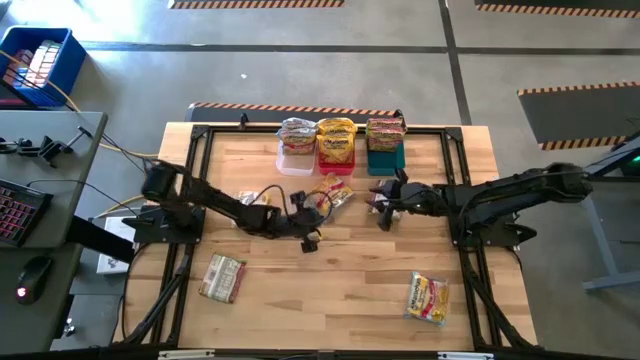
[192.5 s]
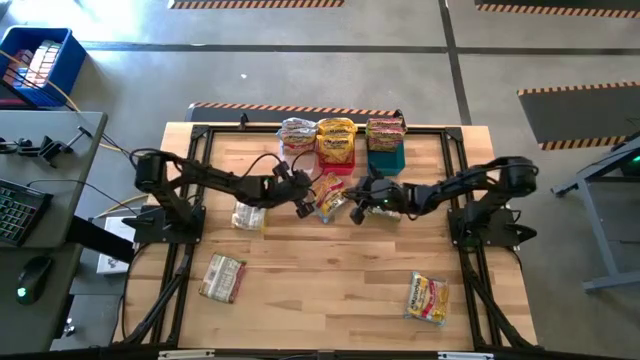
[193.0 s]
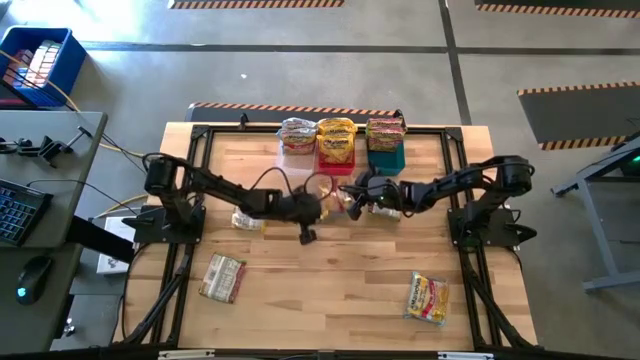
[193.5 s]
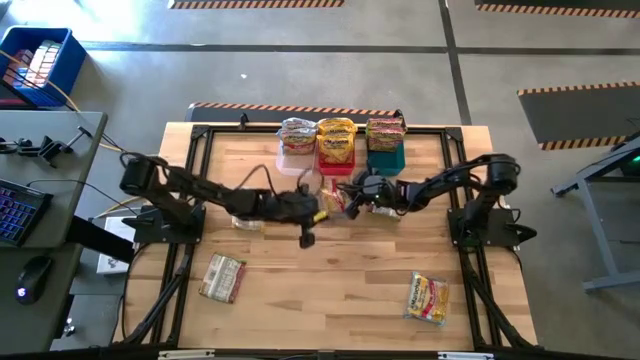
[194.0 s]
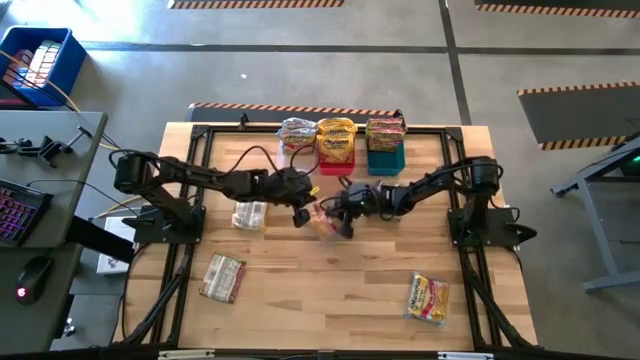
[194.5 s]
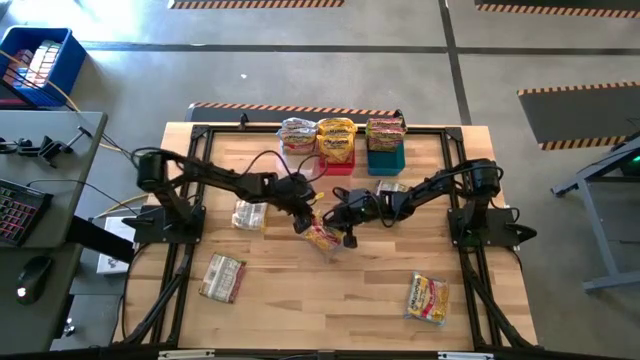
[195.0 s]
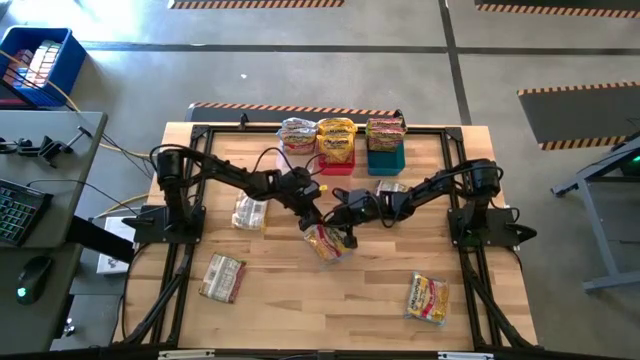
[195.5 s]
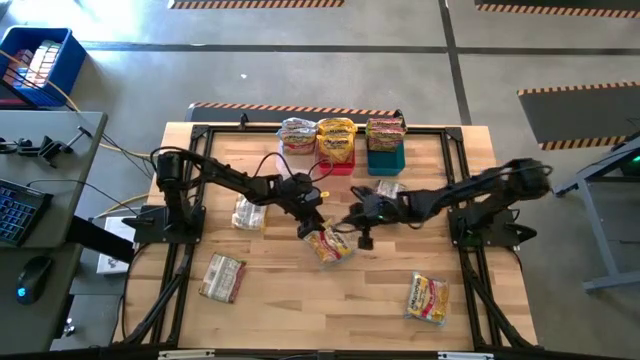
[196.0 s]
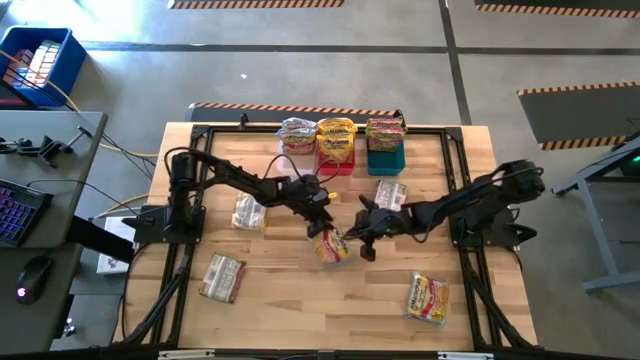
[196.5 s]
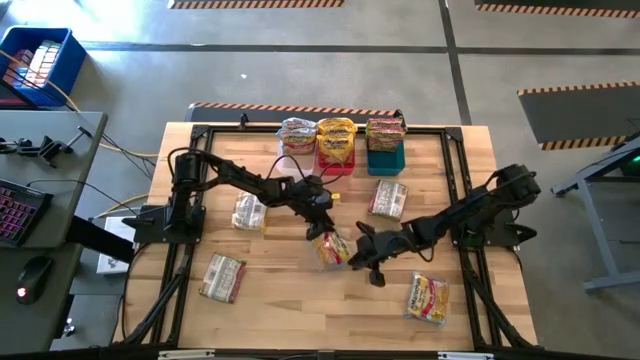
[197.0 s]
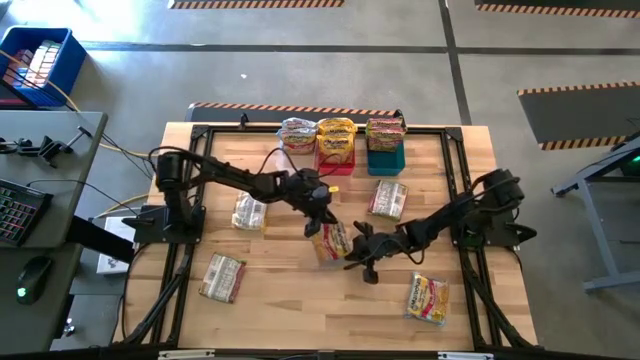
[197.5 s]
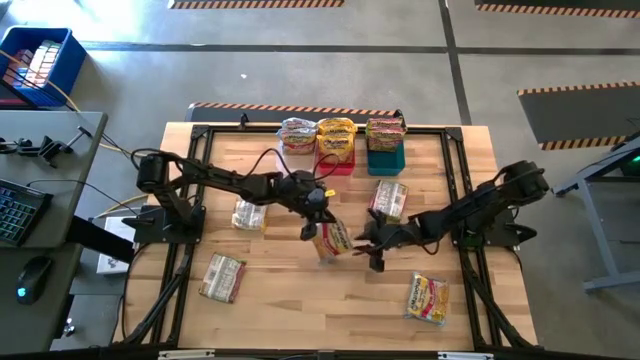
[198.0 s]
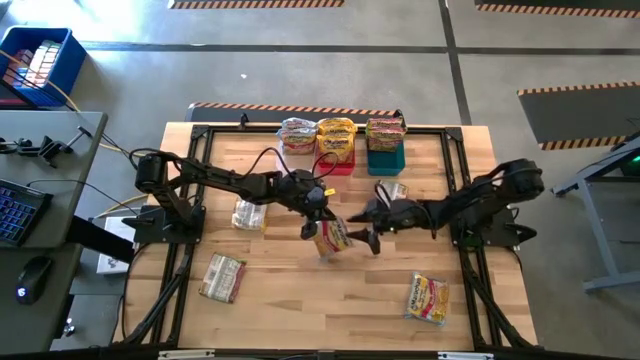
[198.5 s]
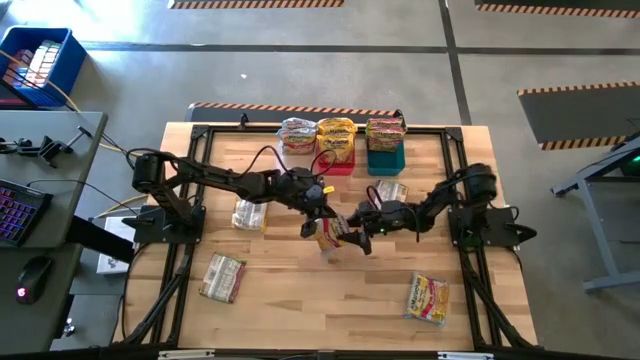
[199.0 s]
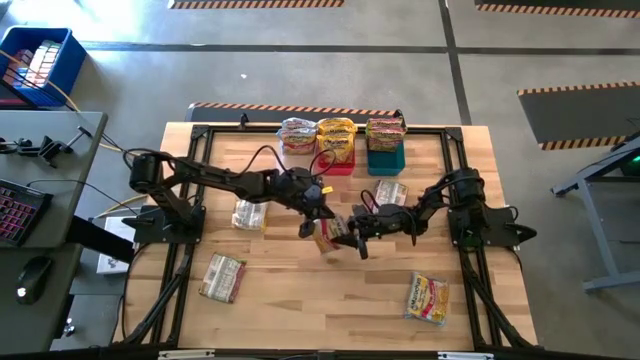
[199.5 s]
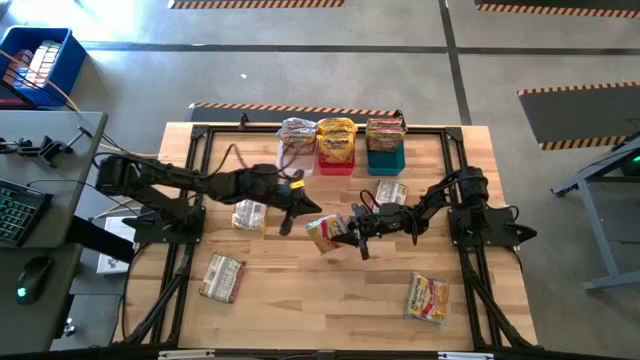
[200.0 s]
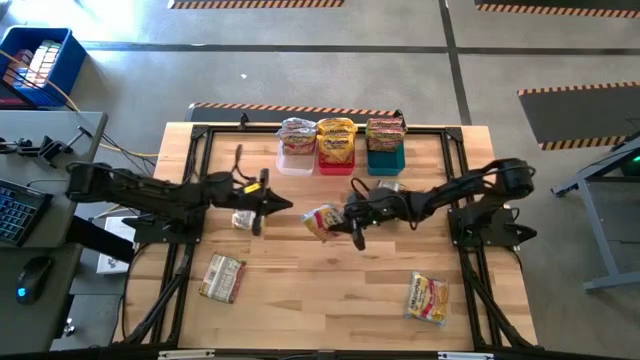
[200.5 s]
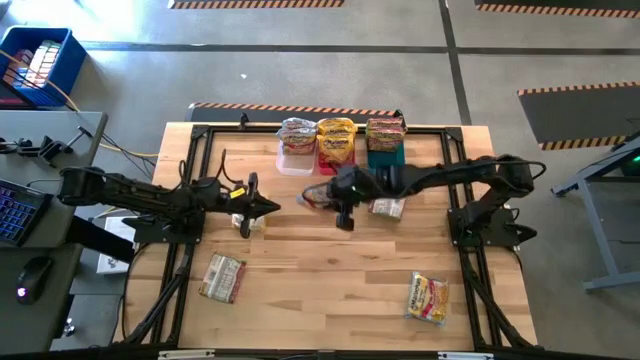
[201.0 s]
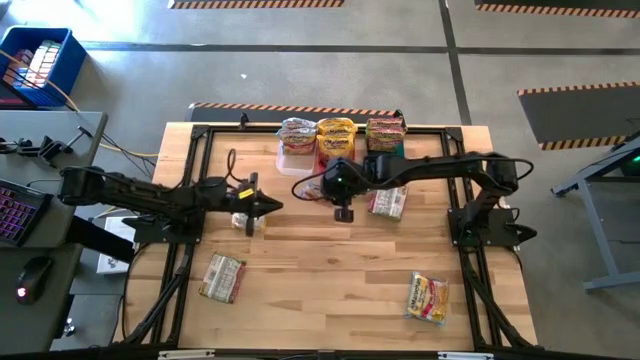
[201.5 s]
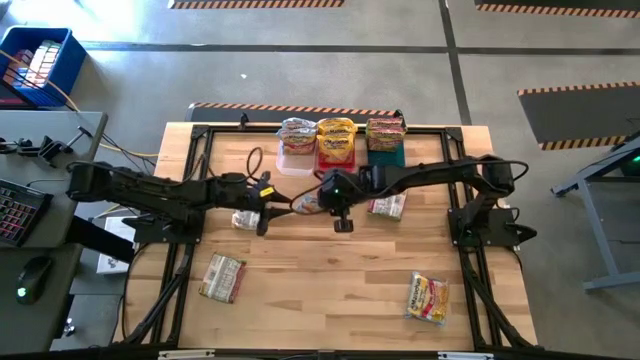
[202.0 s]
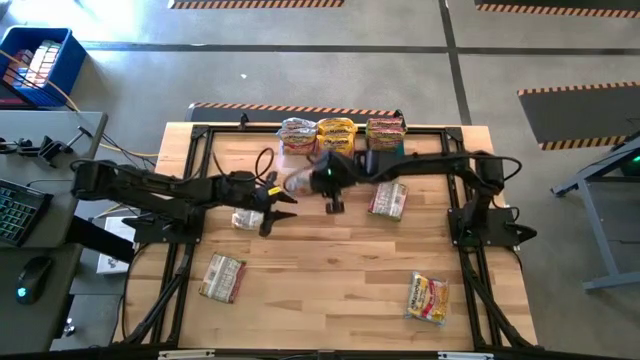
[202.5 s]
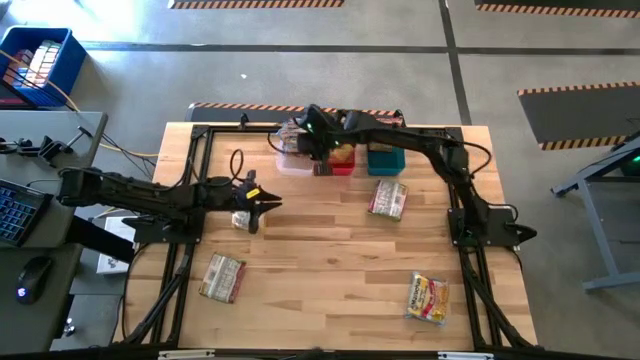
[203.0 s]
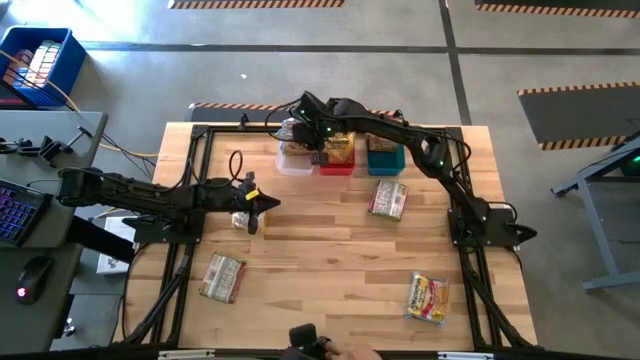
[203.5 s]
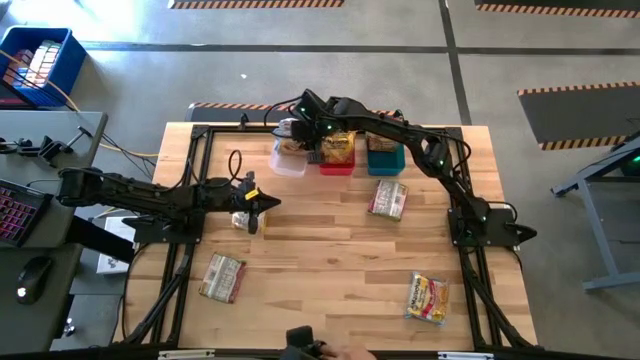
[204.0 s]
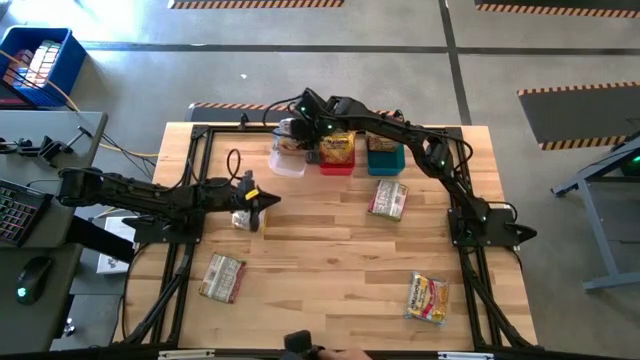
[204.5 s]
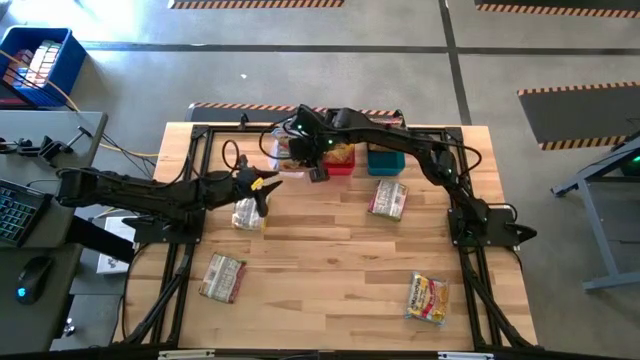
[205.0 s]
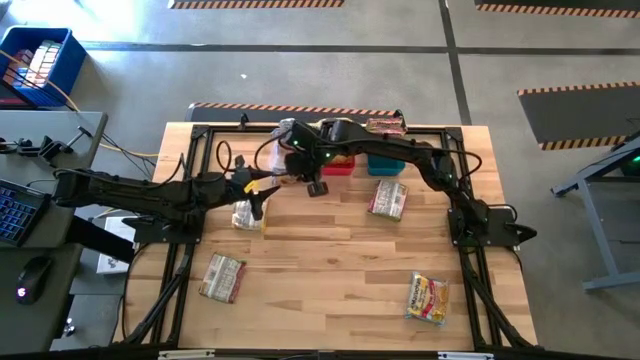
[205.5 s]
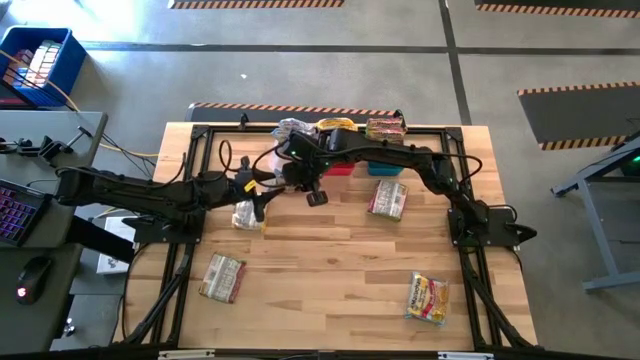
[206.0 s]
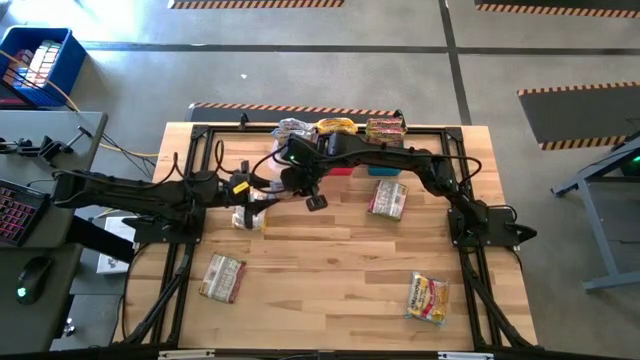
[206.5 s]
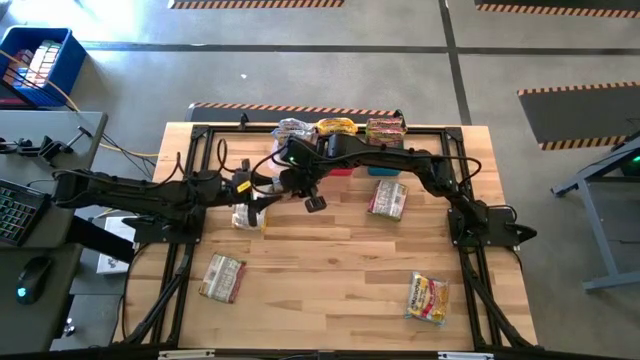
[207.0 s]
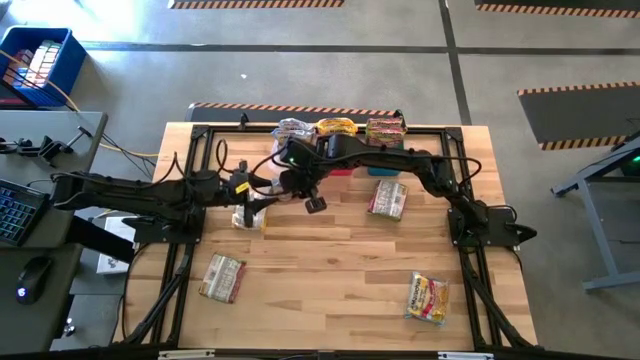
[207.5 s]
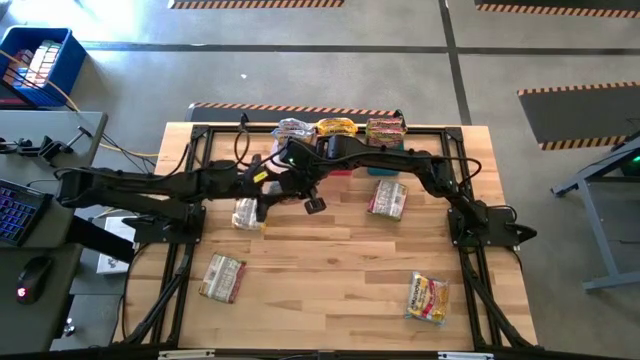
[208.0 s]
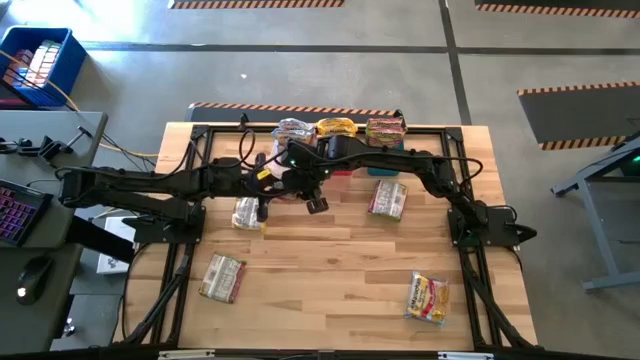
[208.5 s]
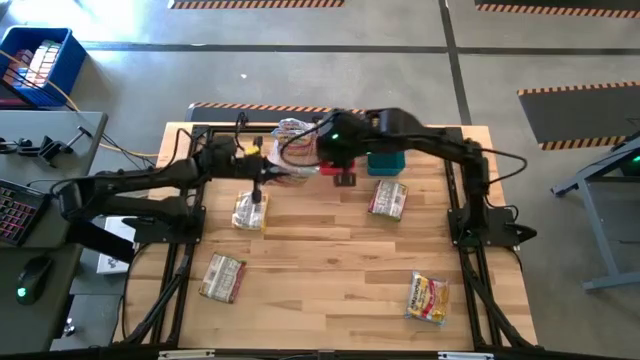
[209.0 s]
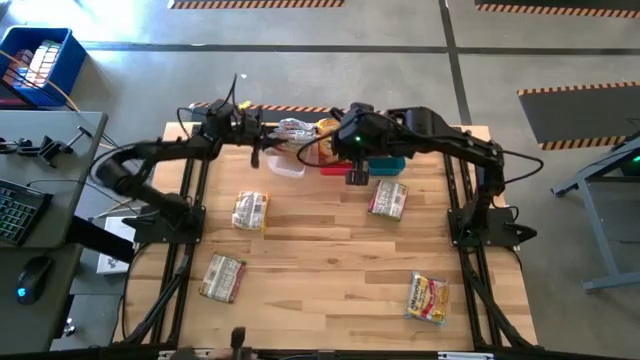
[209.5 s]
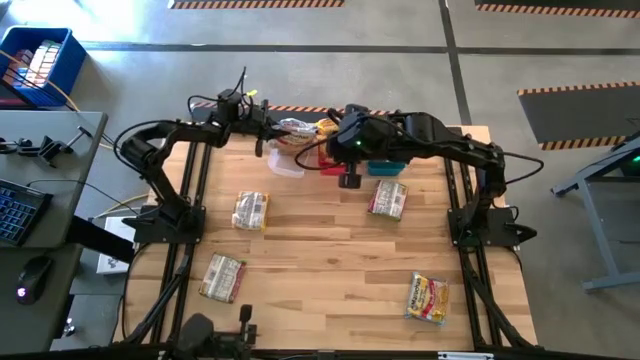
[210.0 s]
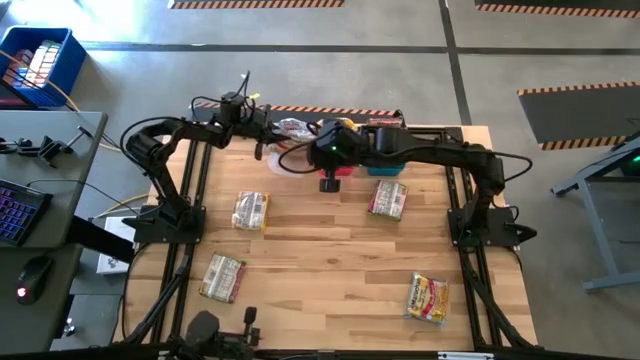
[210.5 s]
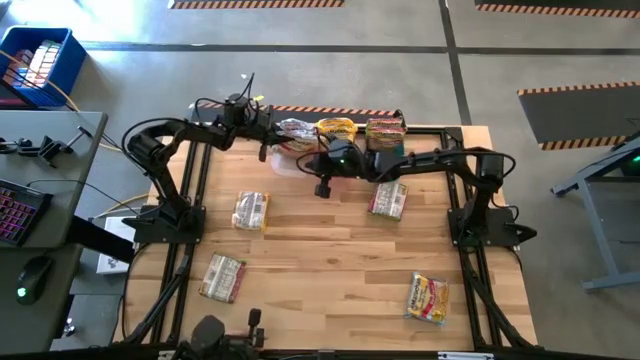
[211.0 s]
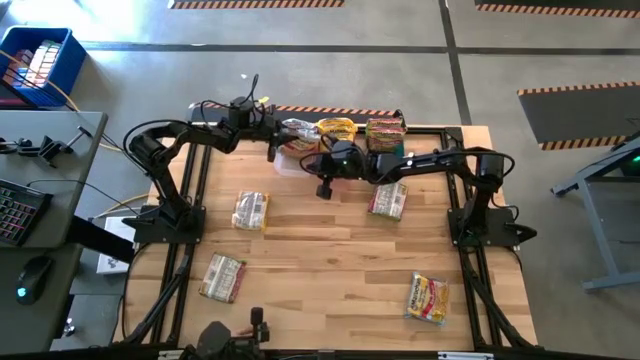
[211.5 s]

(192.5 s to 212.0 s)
Task: Sort Maruchan noodles
Put the blue noodle pack into the transparent bin

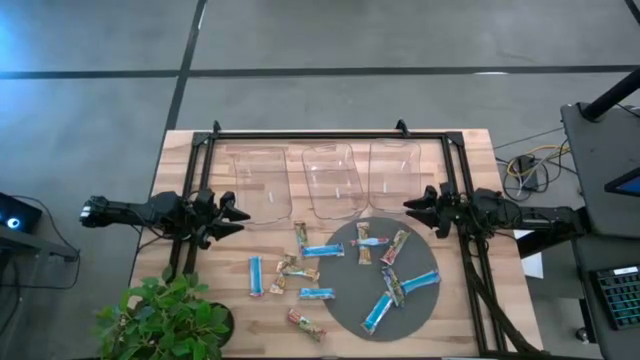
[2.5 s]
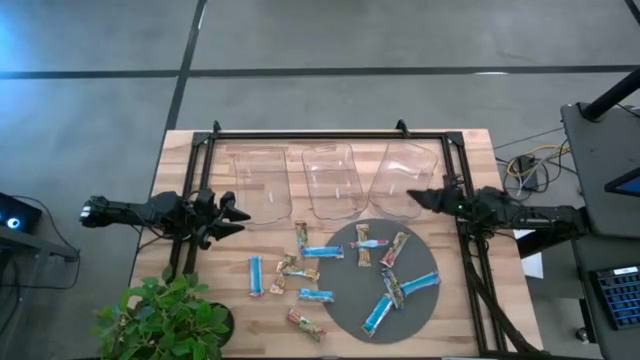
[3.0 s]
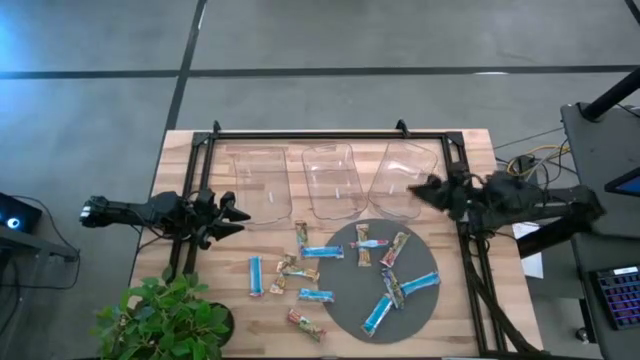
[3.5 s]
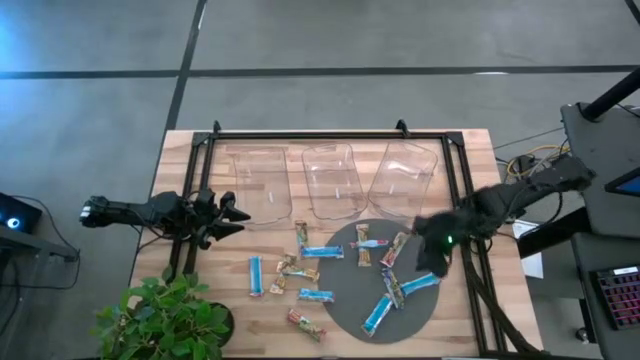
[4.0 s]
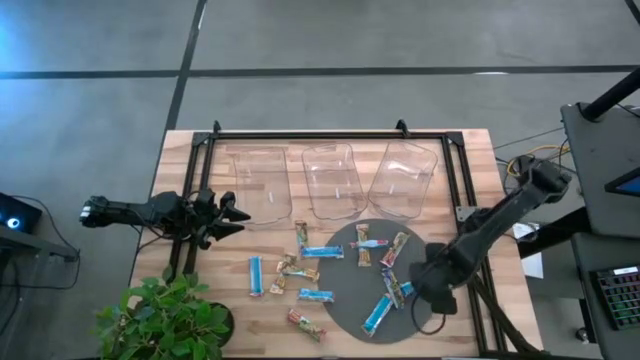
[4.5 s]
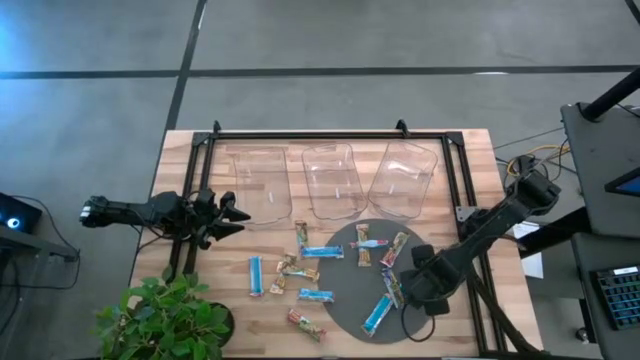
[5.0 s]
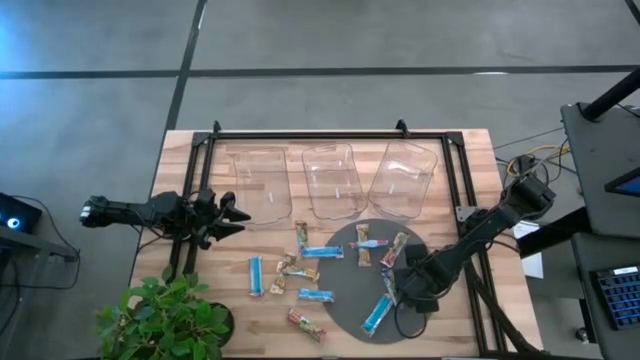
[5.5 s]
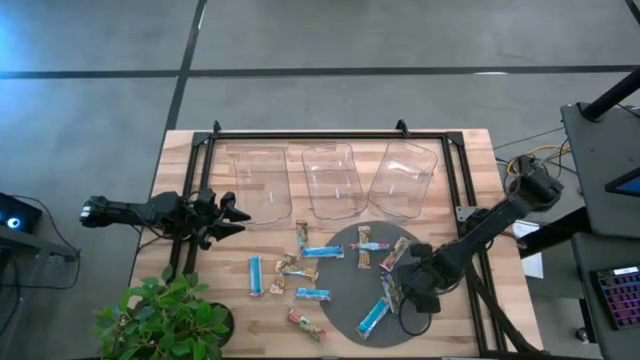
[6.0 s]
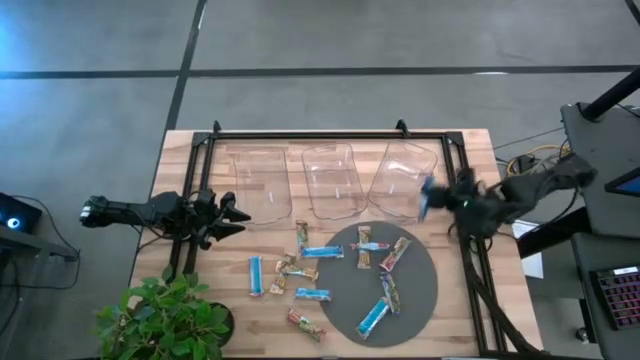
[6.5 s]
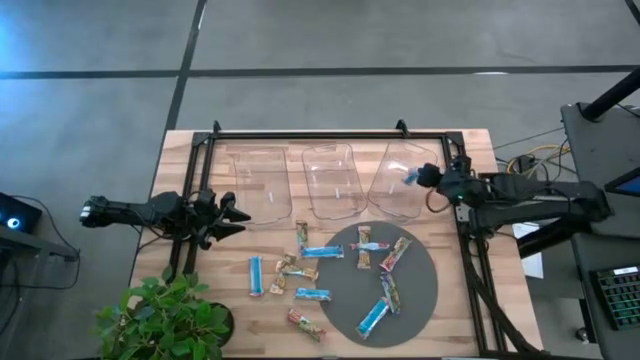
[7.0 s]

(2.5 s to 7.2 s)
Task: Pick and place Granola Bars by type
Put the bottom right blue granola bar into the right transparent bin
